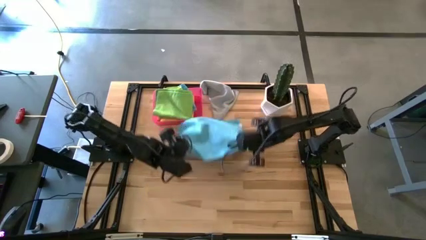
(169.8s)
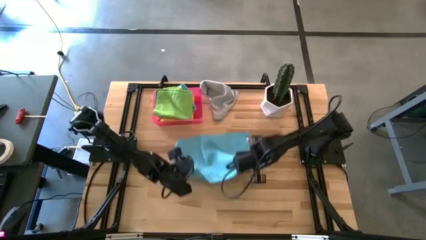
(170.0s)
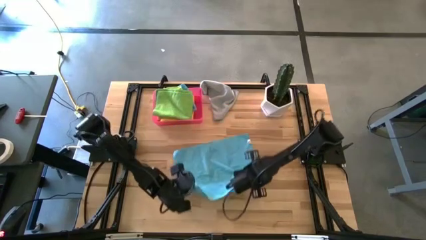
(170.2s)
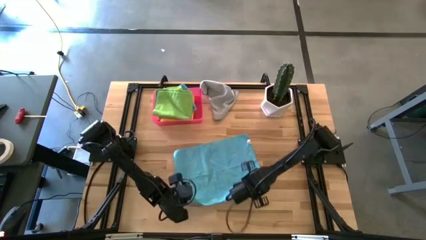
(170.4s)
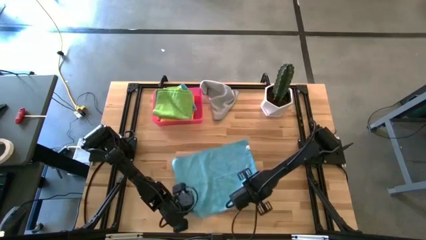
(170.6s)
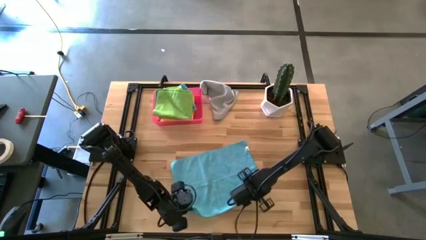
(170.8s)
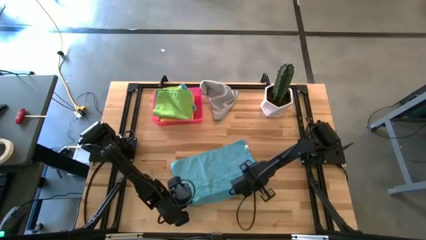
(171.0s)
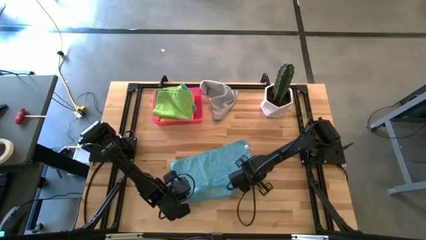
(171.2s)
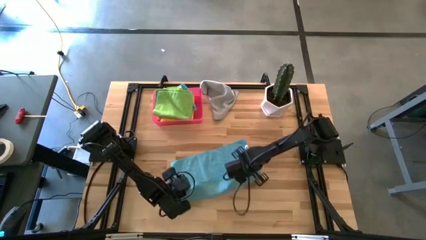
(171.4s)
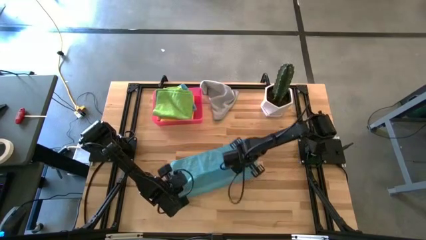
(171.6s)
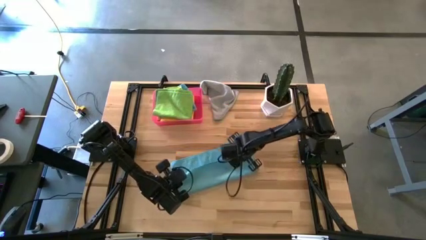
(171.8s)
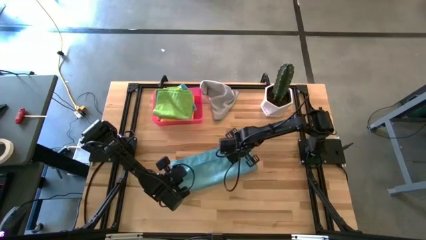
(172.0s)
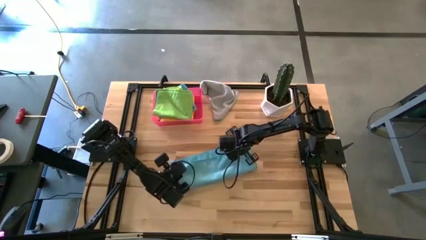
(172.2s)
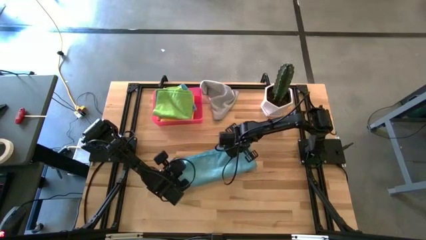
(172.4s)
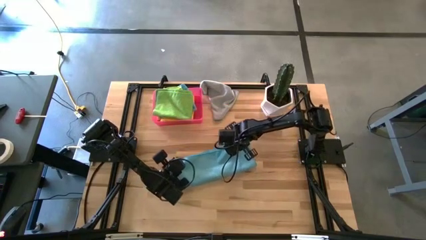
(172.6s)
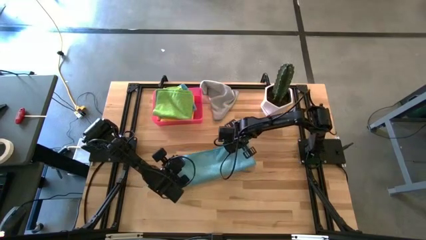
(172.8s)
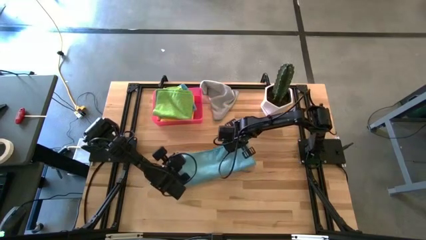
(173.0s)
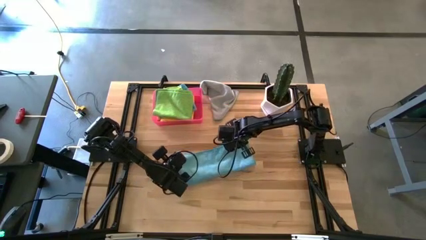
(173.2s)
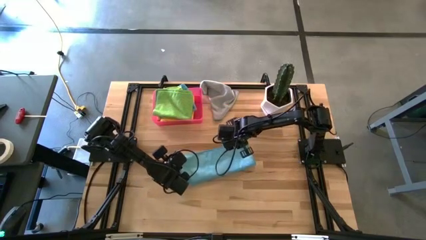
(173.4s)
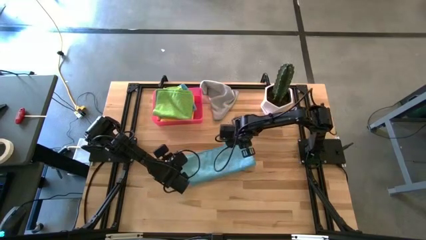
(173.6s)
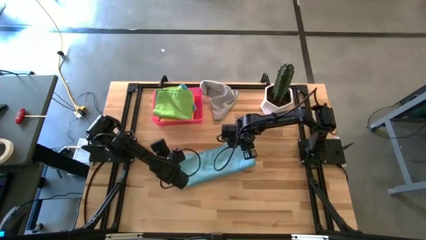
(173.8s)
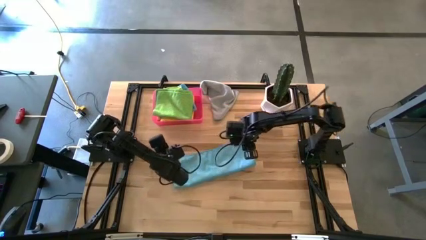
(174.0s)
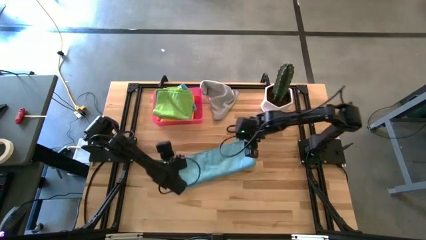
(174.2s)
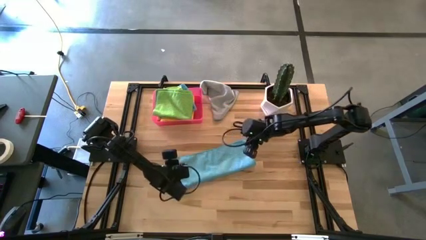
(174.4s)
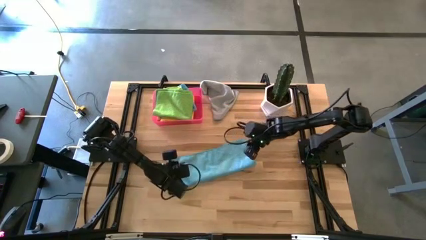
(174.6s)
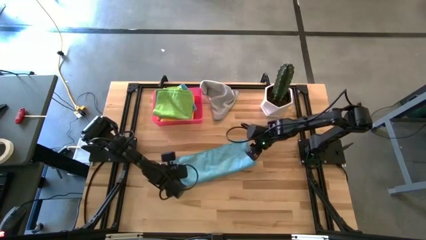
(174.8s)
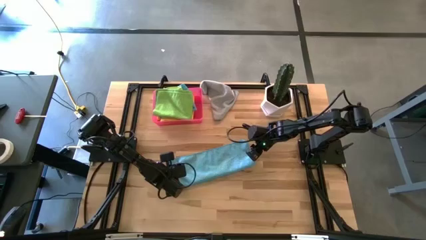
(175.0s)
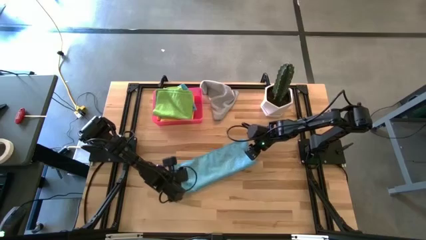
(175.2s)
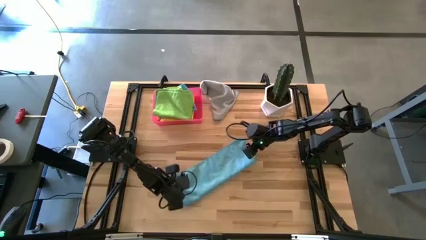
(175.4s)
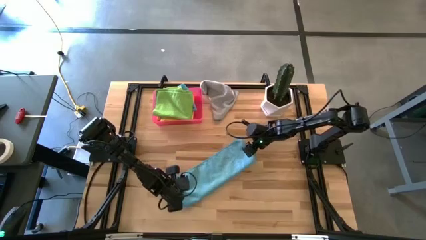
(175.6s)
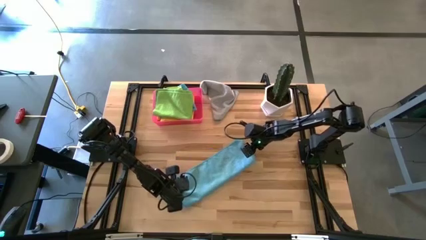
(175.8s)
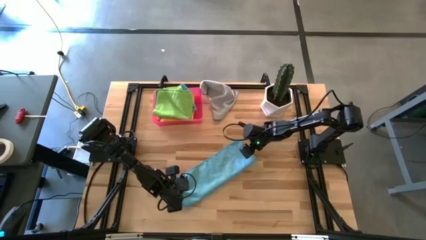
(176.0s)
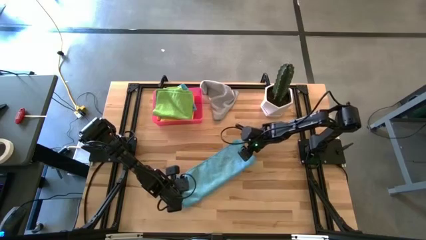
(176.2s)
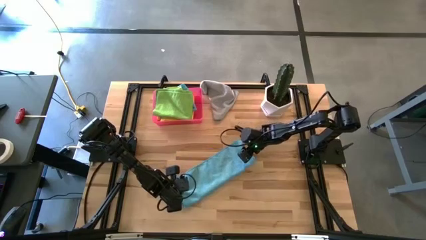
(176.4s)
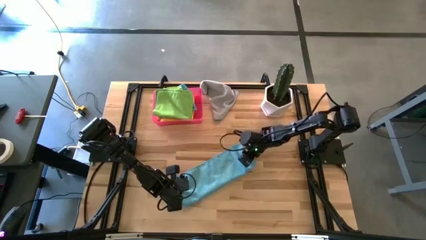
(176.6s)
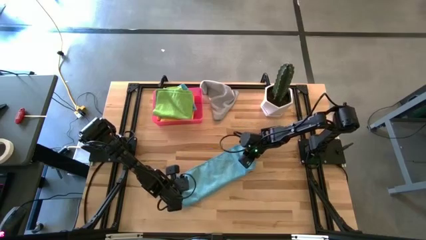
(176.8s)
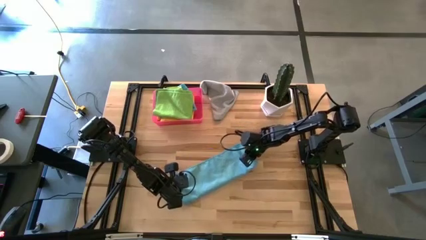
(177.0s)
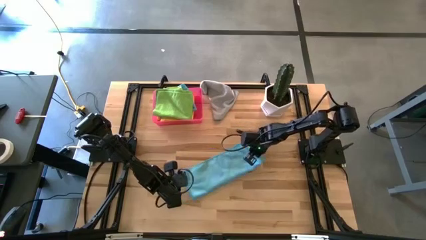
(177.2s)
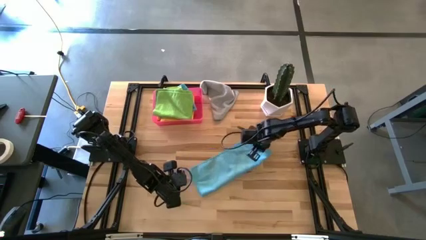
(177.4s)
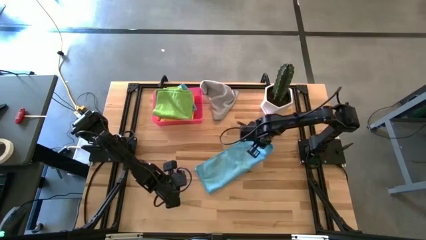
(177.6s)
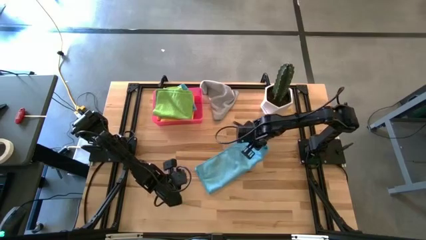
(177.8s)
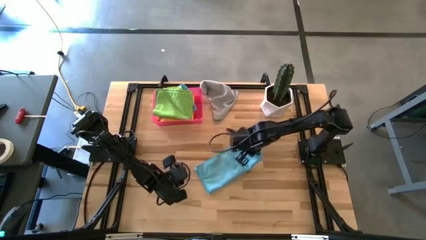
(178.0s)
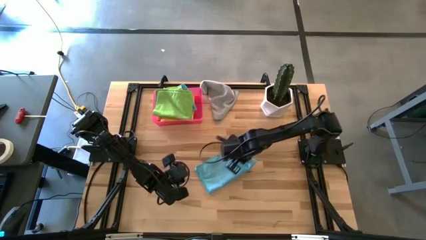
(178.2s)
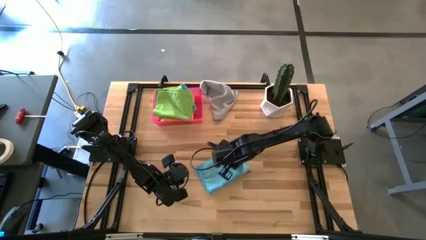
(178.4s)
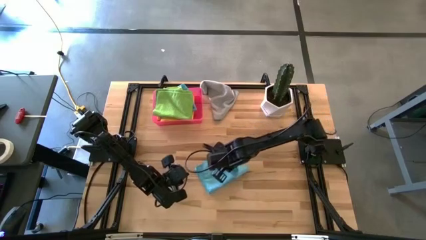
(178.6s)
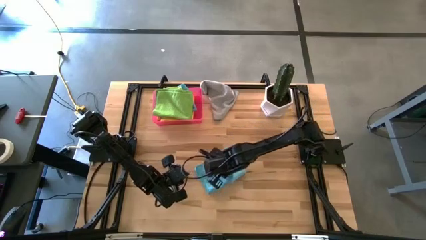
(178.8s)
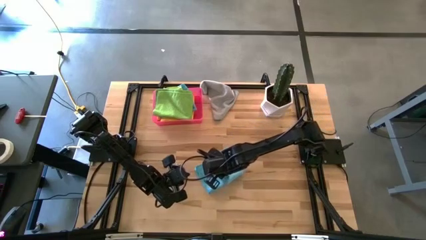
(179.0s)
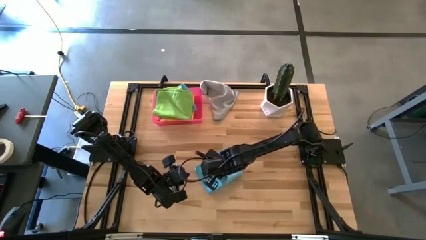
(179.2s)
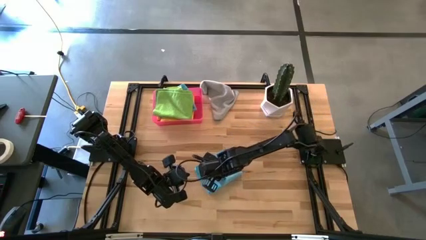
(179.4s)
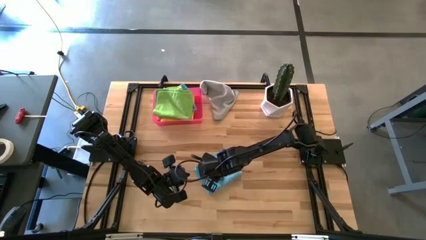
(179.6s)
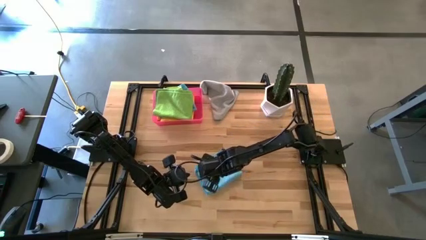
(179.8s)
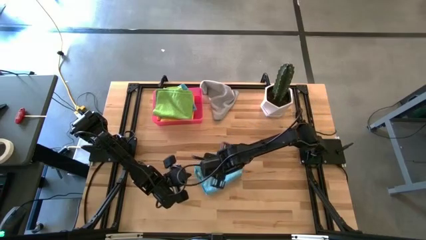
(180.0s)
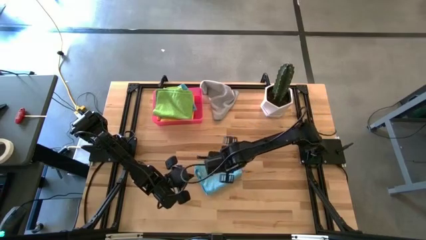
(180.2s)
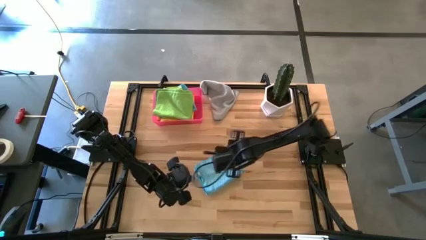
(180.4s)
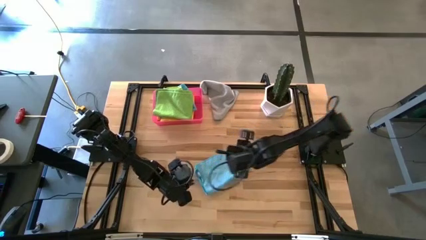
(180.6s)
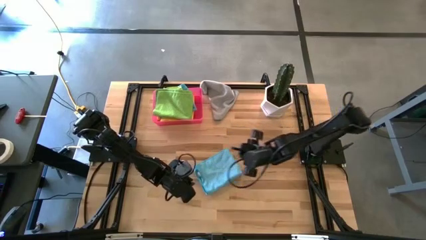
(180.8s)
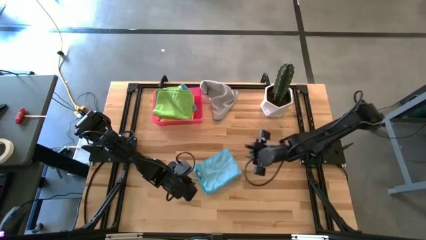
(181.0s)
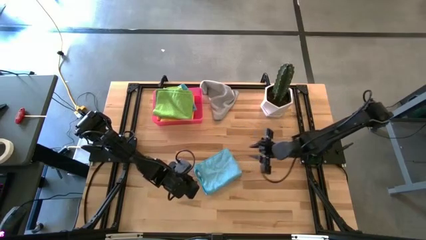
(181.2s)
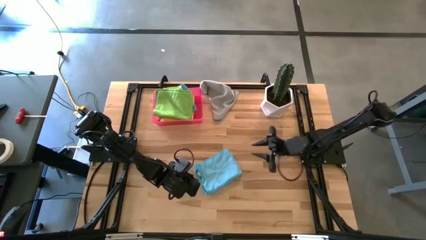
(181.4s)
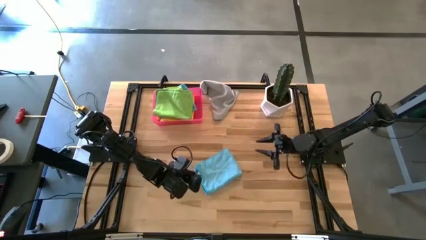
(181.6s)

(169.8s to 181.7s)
Task: Fold microfiber towels
Fold the blue towel on the table

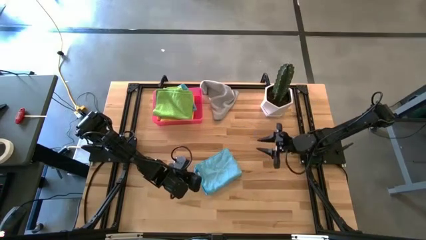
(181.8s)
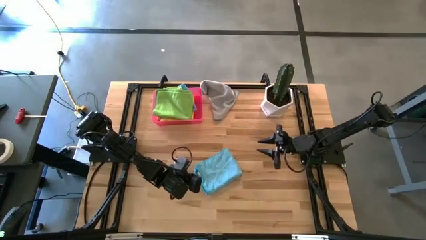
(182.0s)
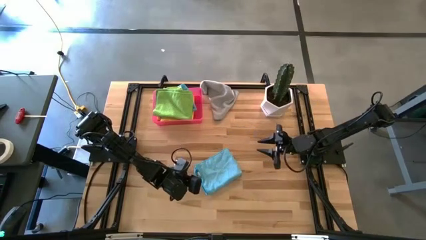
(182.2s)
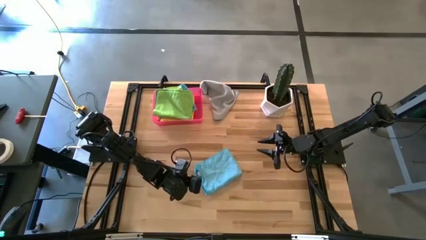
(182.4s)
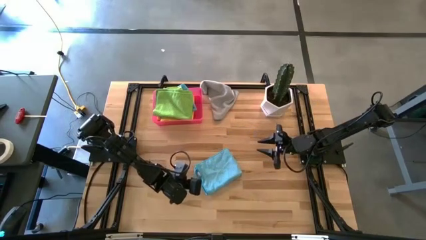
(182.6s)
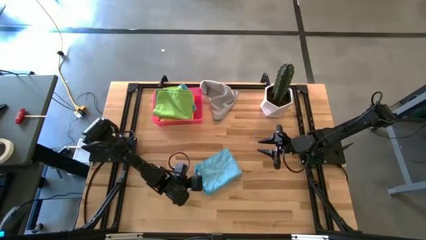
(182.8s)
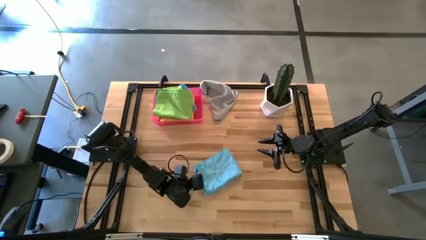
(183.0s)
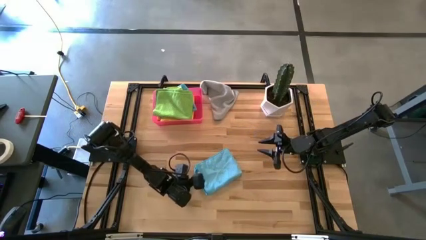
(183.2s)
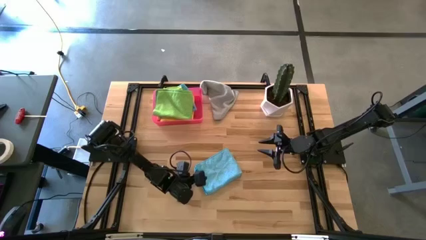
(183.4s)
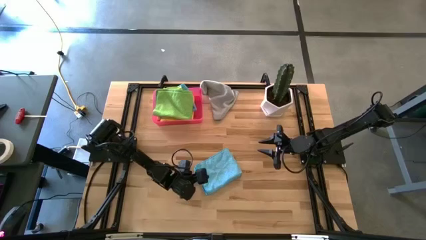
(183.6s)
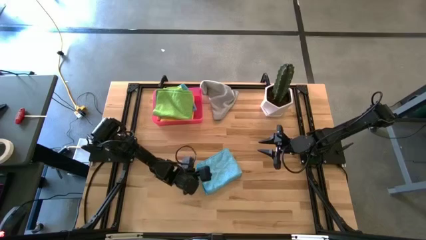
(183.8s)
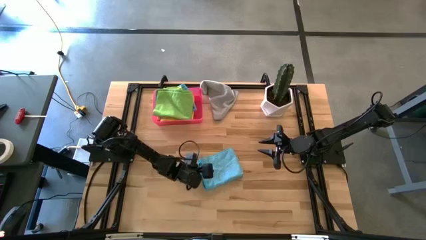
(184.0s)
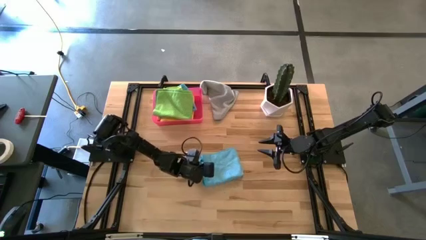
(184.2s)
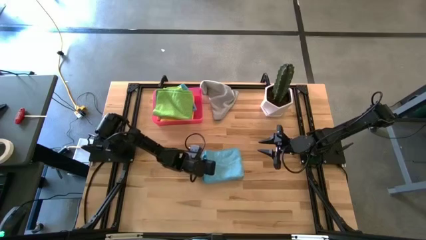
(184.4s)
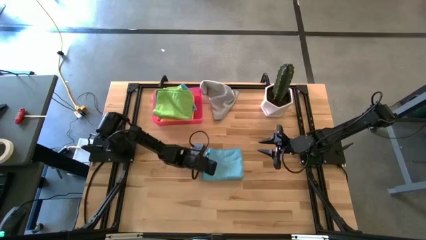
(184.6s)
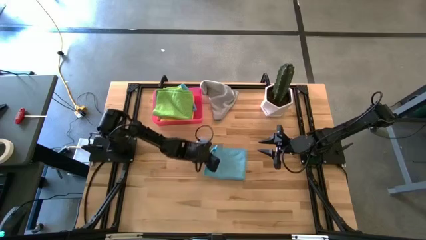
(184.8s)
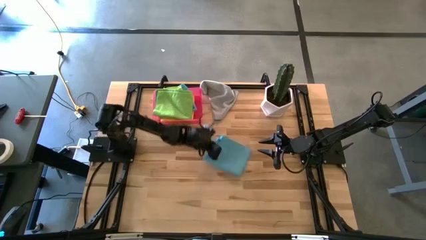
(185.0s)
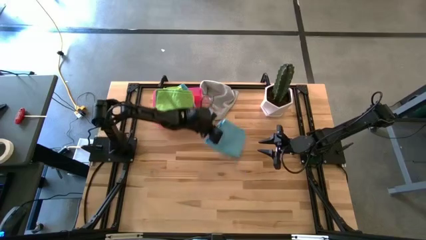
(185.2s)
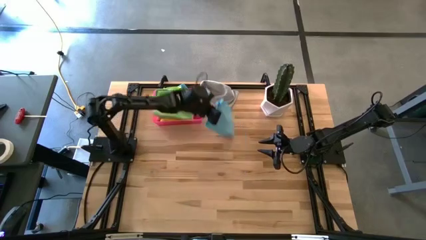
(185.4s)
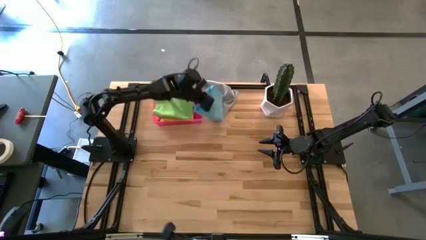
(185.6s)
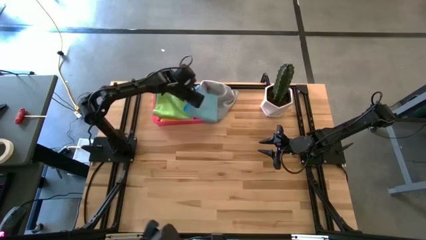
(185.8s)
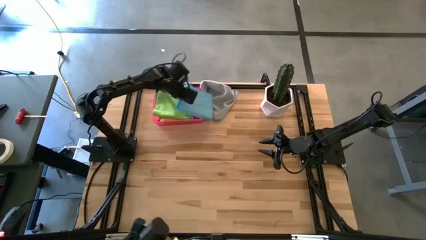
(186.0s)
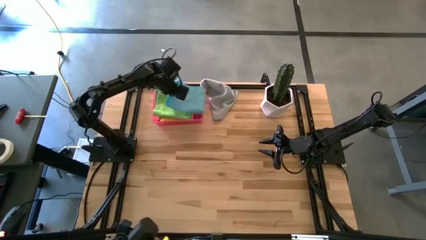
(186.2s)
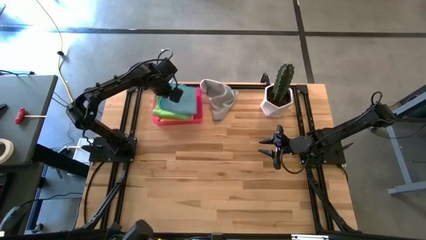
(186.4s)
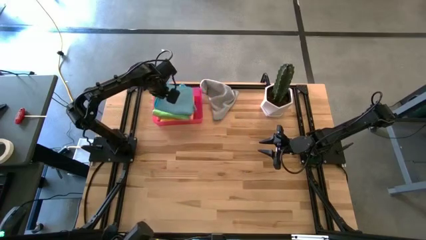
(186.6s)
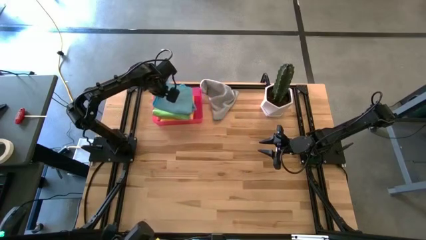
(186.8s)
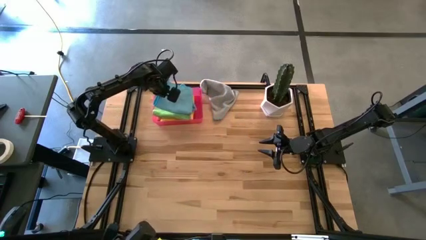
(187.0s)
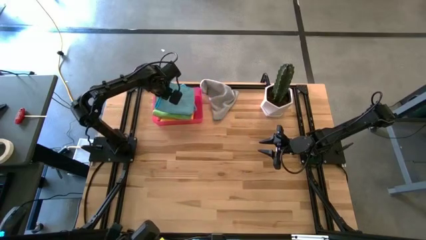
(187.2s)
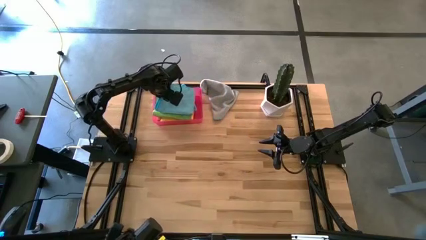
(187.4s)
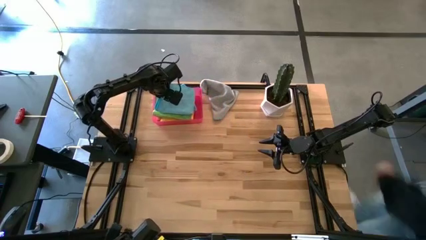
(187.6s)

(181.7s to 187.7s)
Put the blue towel into the bin
